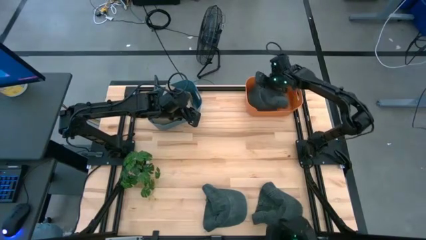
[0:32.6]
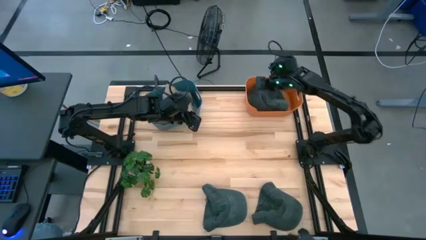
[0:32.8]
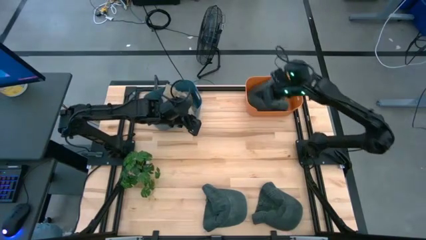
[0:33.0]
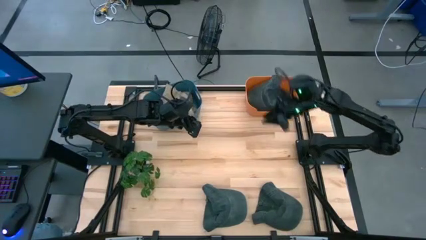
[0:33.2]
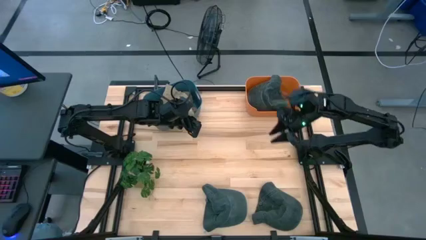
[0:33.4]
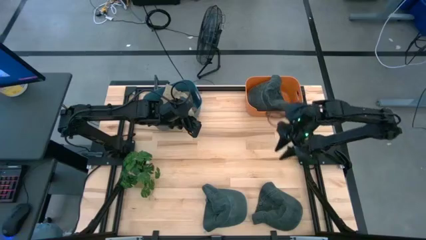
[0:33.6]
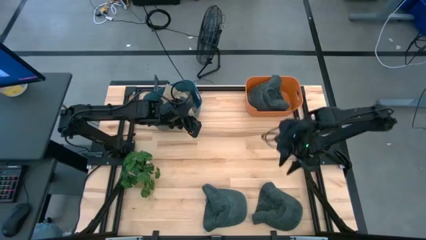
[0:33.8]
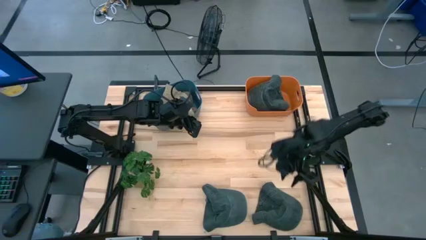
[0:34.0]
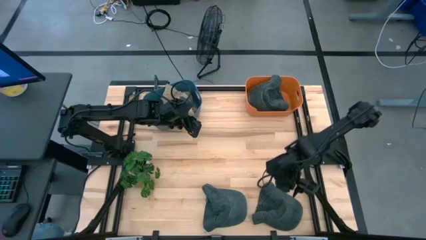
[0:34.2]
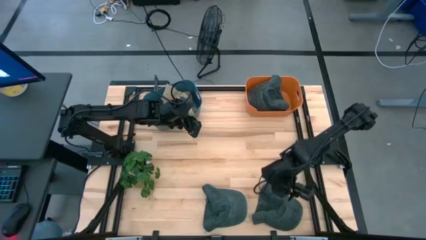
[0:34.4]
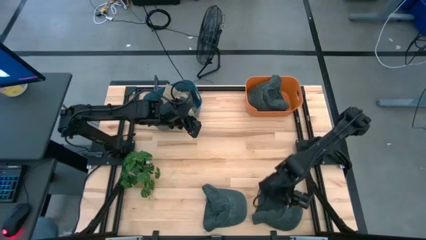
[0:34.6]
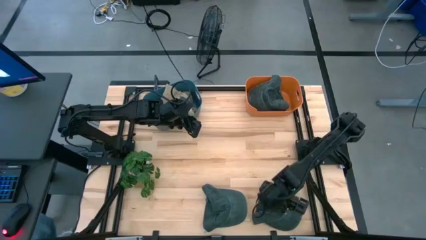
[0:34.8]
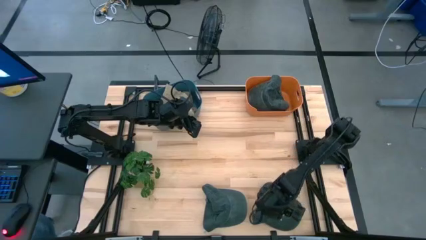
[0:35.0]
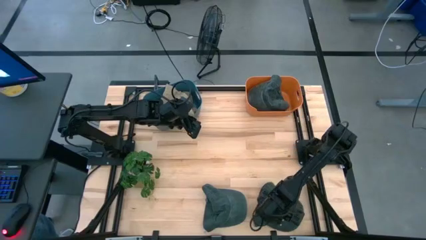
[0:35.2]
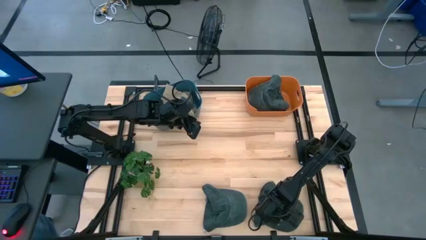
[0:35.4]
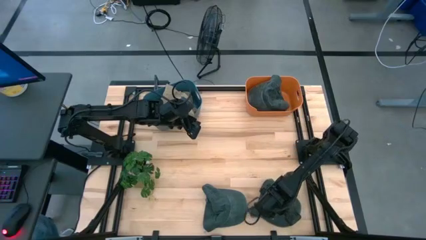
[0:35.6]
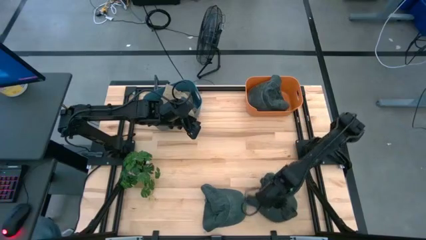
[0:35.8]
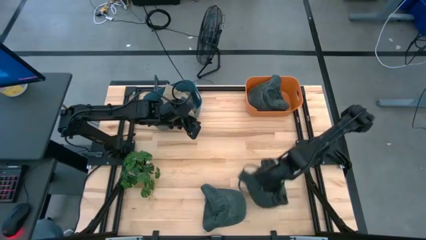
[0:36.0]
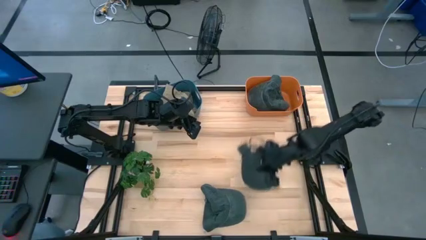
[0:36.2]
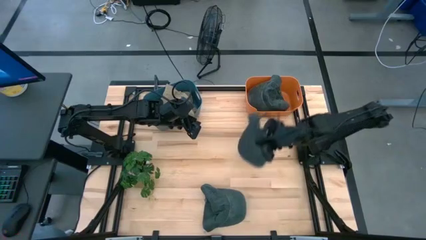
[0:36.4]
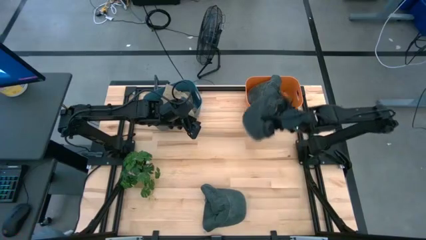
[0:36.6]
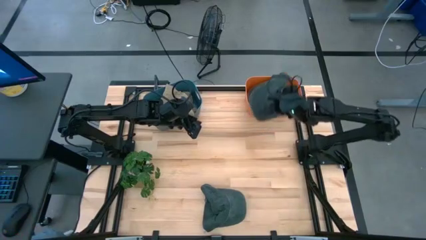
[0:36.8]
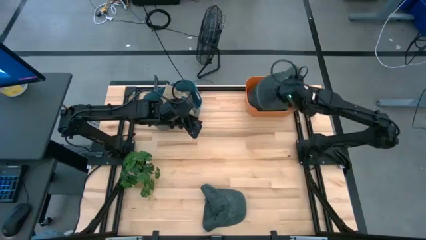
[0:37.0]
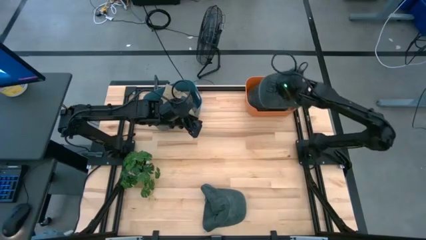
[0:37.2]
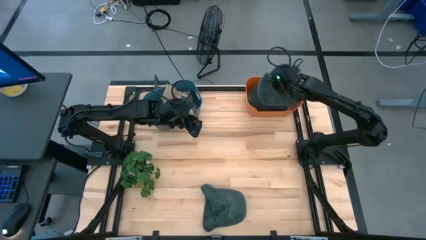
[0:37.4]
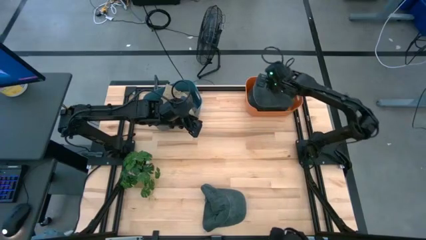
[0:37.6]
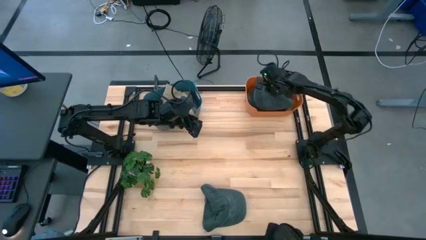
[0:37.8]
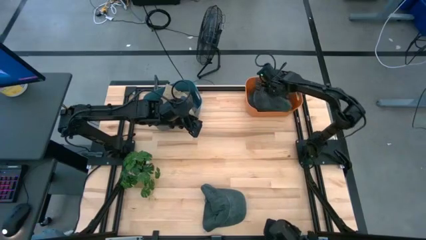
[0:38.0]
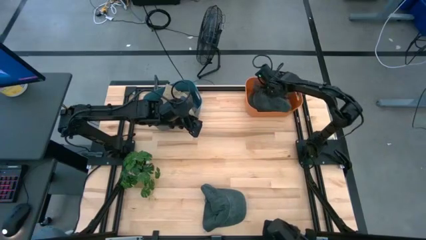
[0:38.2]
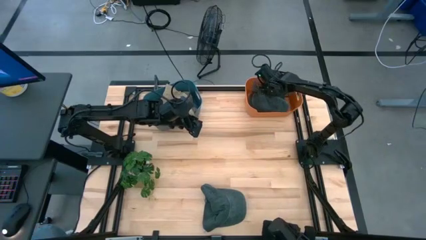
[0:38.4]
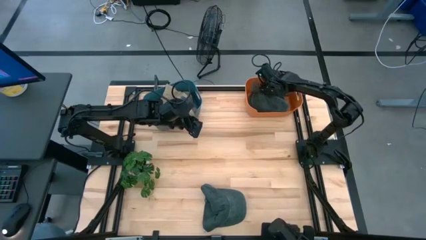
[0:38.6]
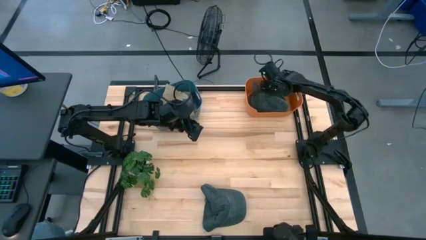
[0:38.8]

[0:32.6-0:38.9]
Task: Pick & Place hat
Put the right gray cap into the orange bin

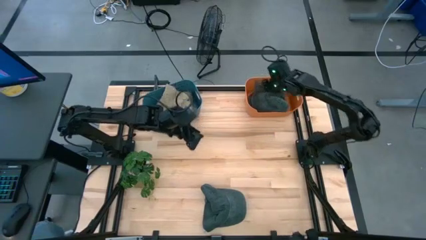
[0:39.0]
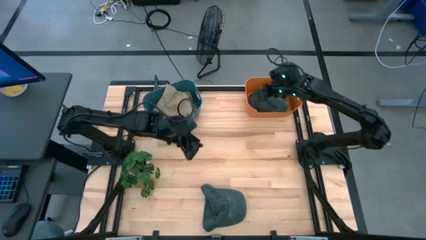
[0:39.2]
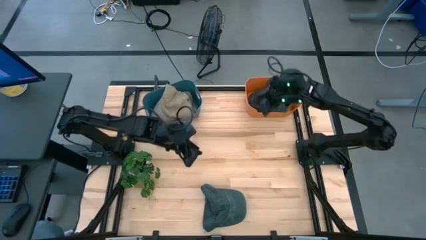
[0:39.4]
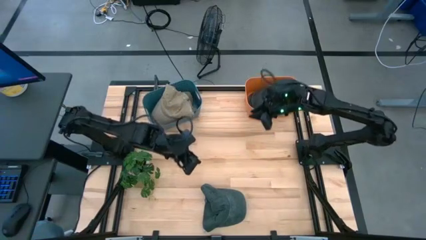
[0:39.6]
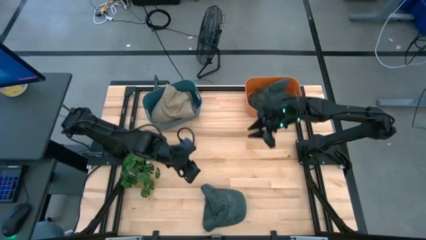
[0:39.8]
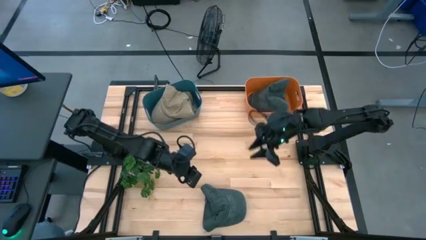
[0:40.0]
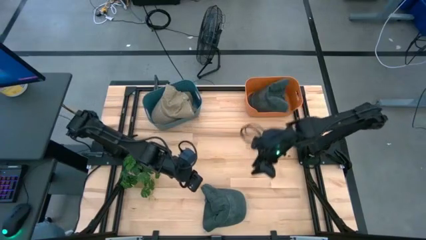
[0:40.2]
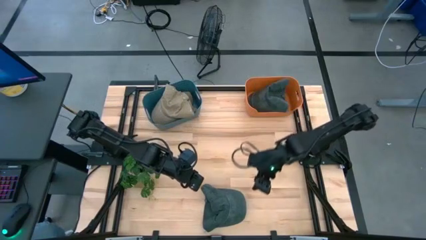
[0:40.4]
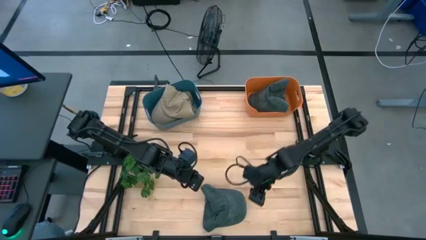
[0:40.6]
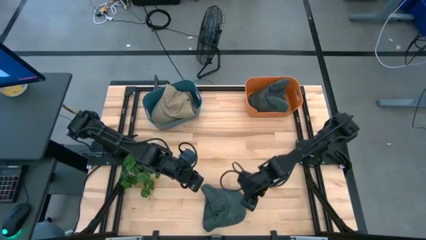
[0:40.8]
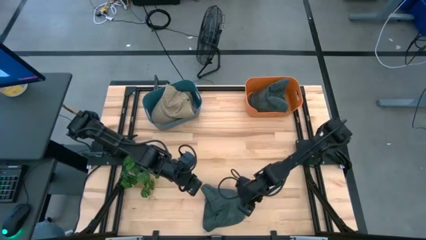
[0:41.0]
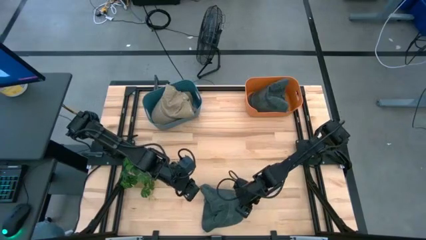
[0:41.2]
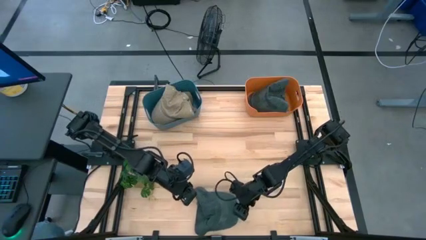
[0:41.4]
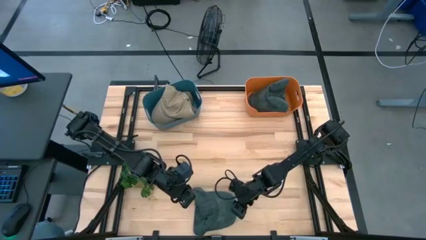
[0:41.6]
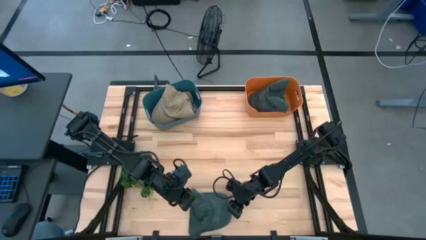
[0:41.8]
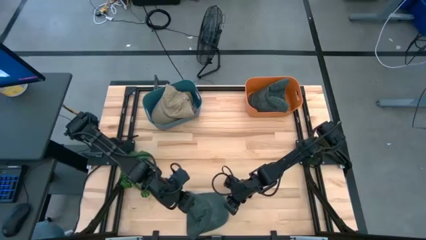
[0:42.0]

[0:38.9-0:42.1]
Put the gray cap into the orange bin

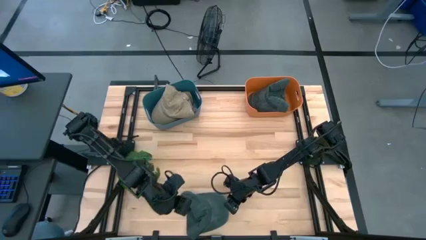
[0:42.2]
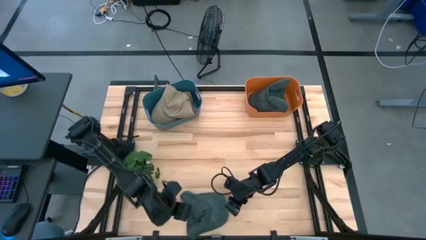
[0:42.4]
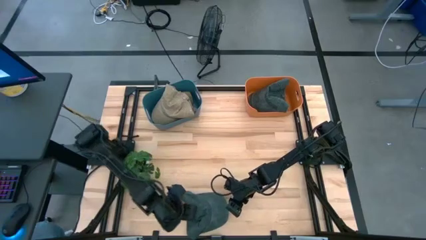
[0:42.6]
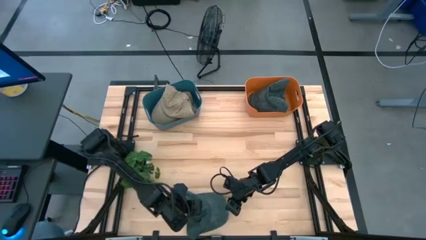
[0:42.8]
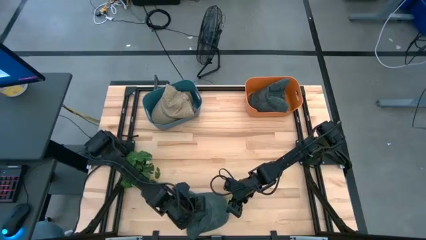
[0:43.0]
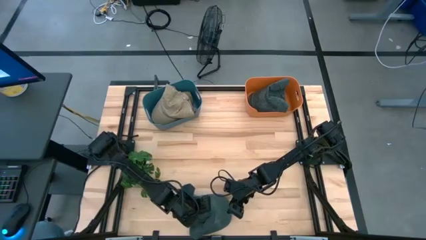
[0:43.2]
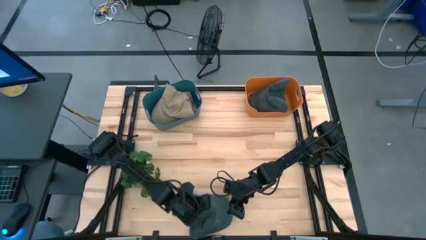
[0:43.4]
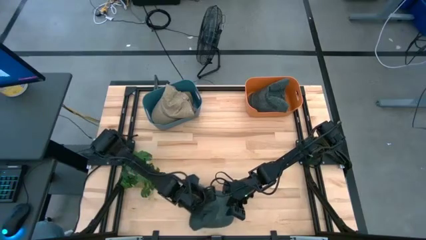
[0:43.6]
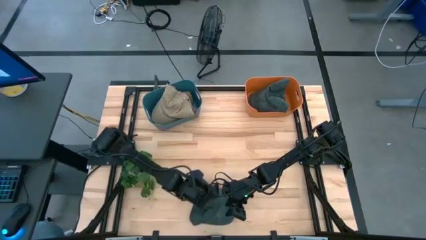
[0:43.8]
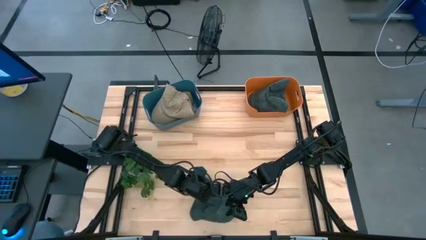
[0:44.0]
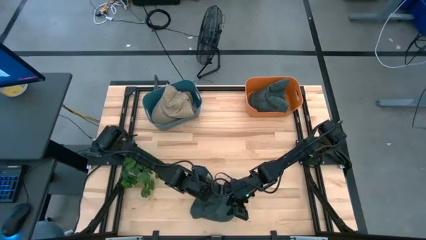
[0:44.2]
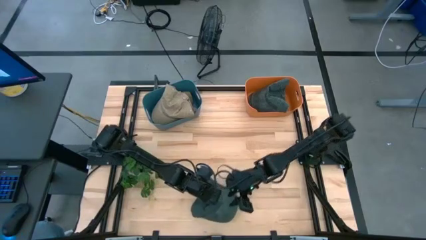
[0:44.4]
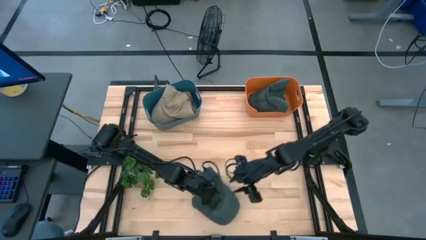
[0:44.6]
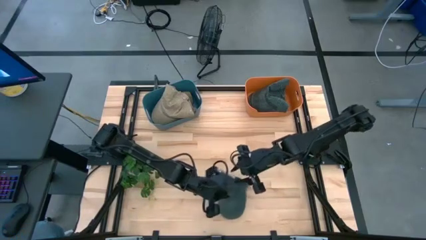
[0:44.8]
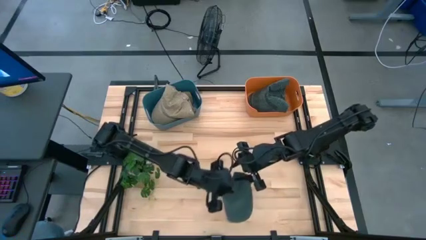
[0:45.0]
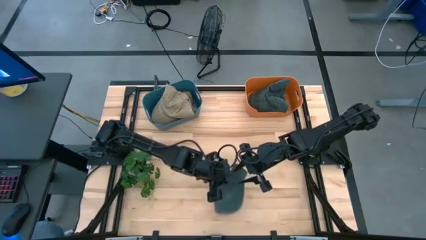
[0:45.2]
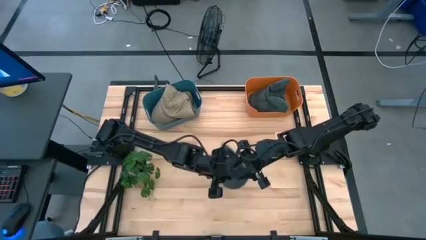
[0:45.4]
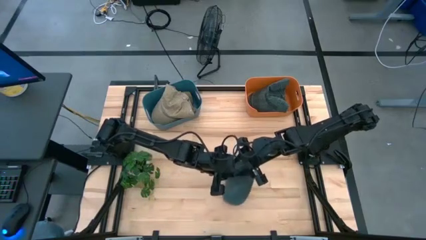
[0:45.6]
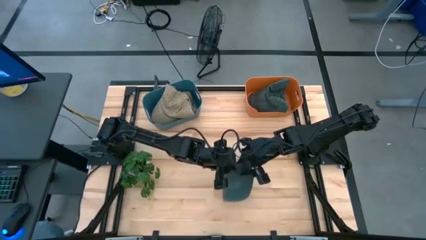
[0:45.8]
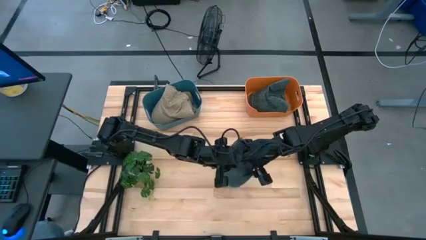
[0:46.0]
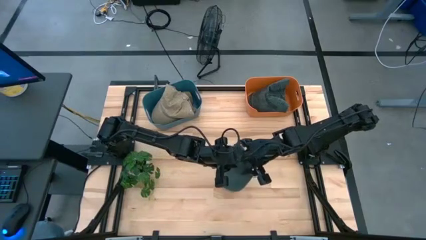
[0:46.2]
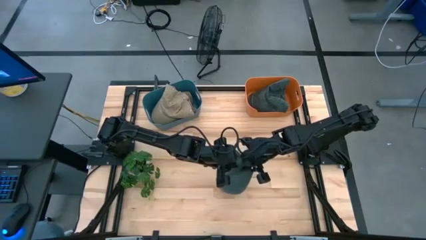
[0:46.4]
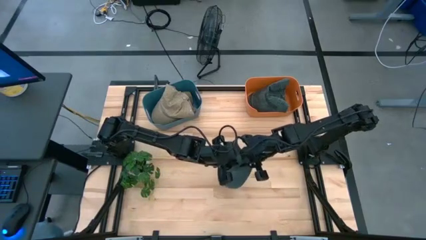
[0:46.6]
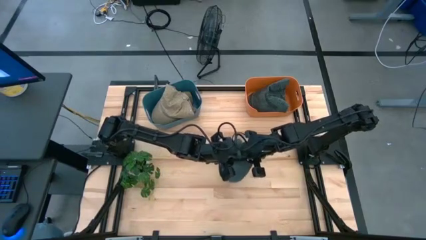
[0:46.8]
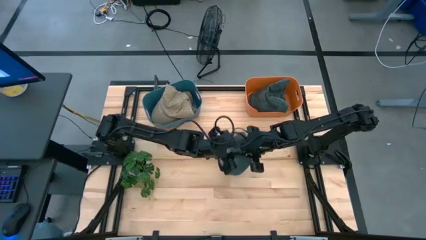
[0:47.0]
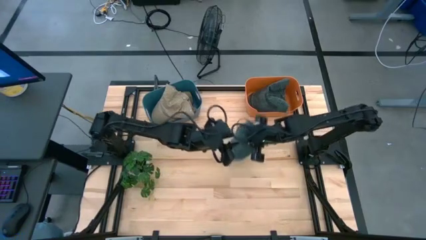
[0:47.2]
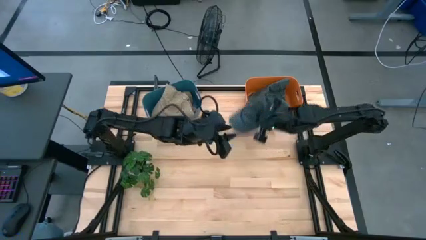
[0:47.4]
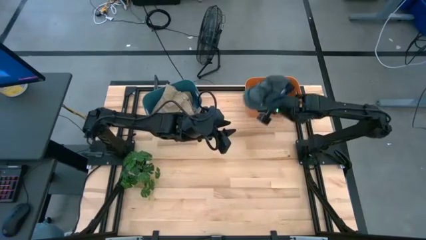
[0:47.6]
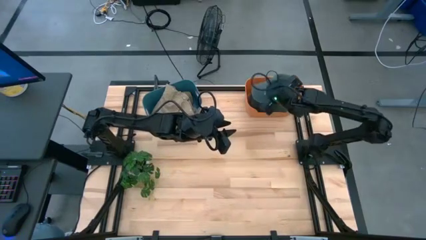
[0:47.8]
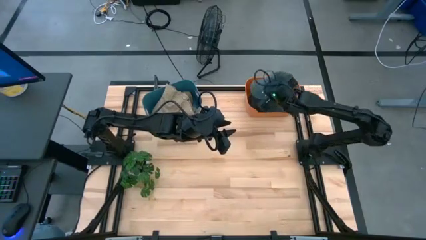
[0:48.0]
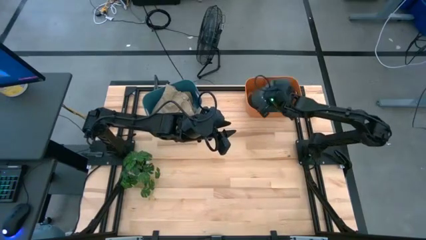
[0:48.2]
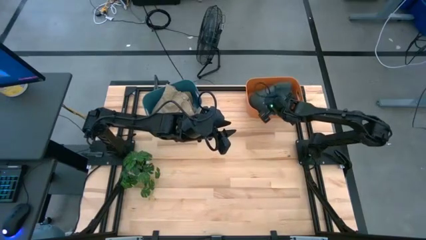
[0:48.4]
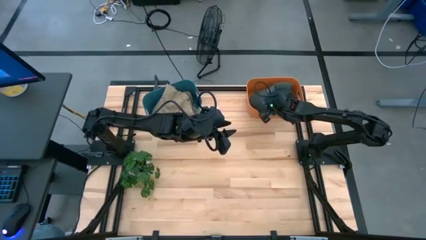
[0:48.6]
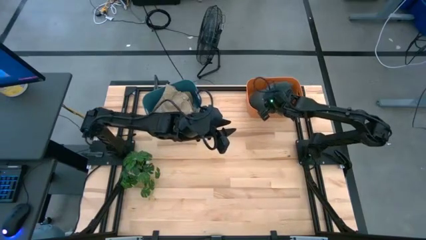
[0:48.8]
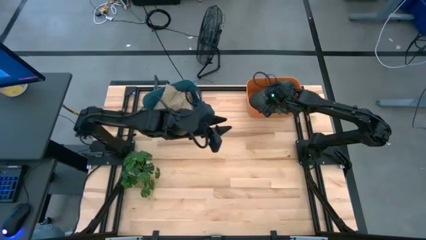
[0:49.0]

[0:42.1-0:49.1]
Put the gray cap into the orange bin
